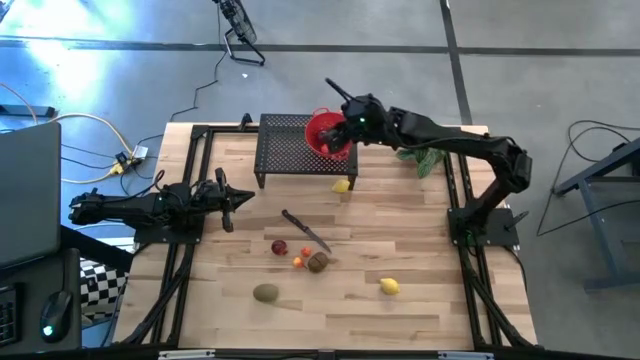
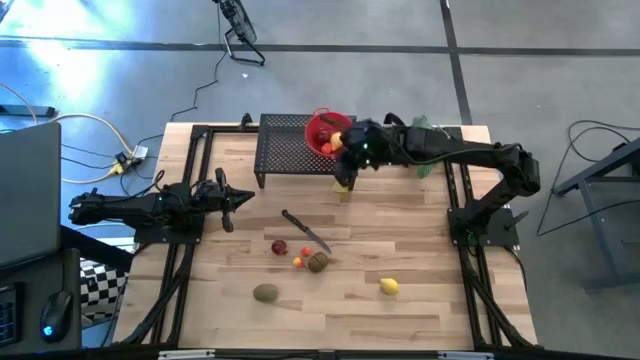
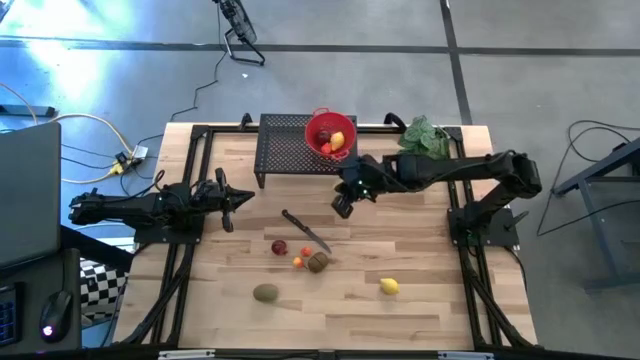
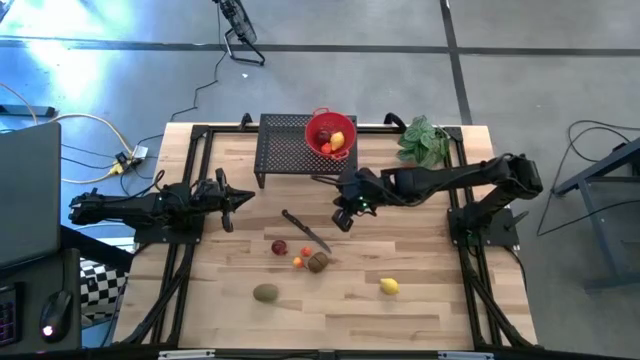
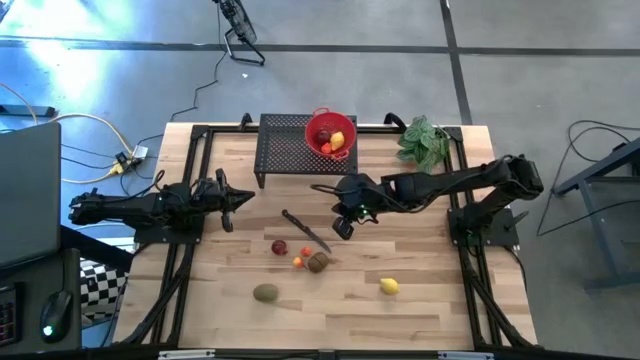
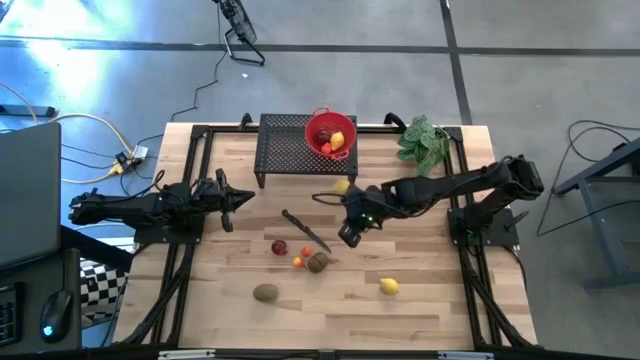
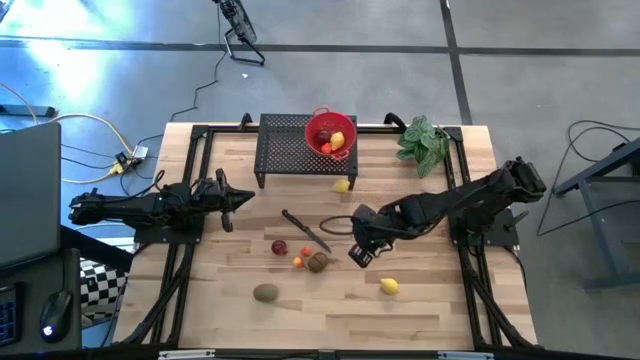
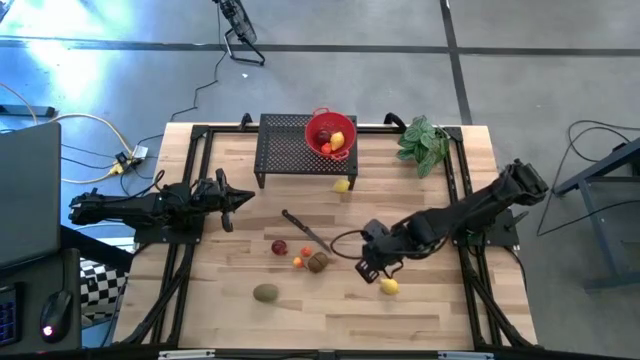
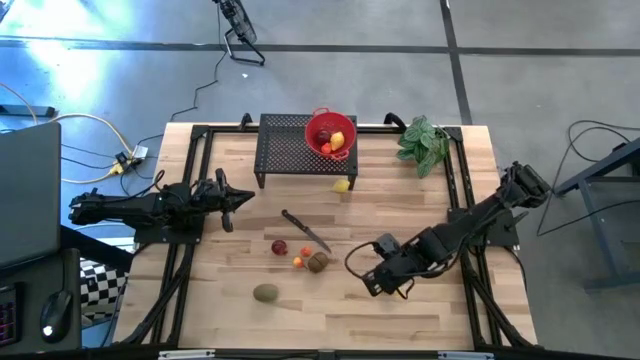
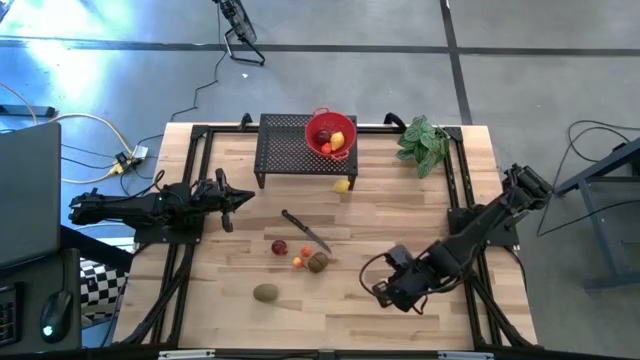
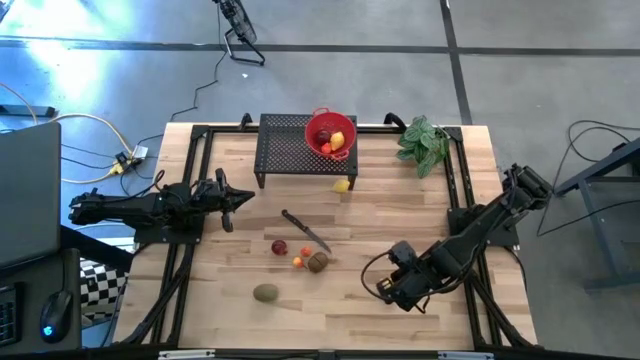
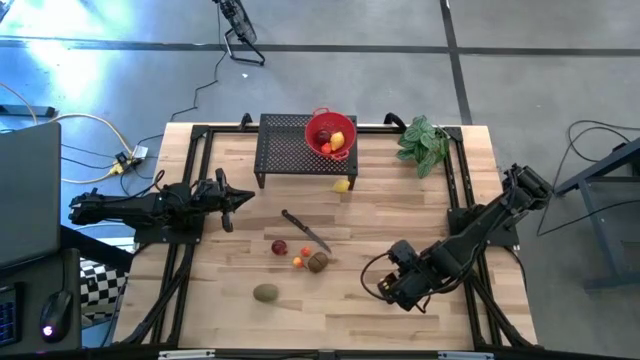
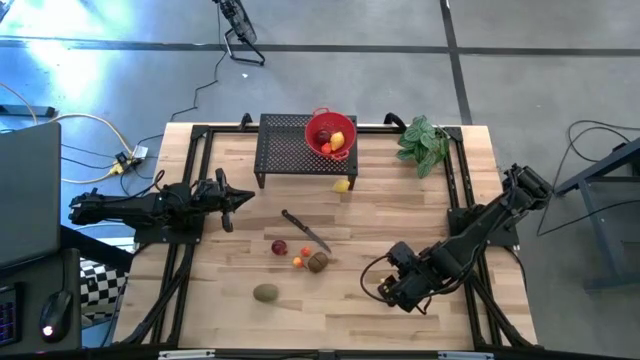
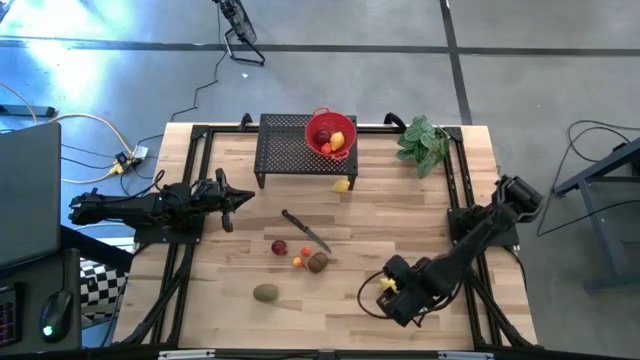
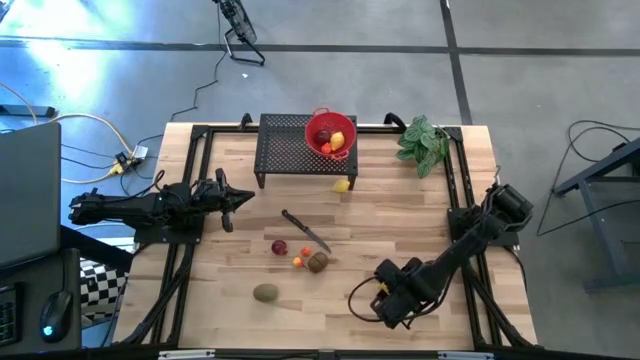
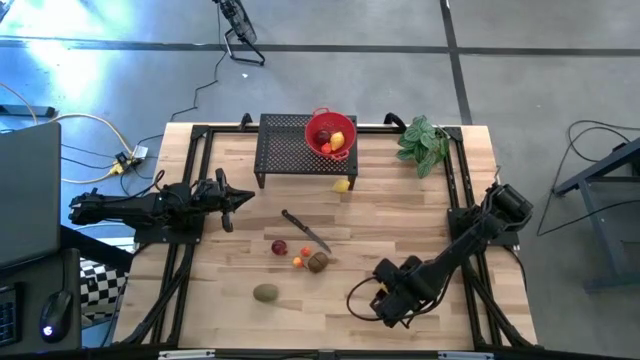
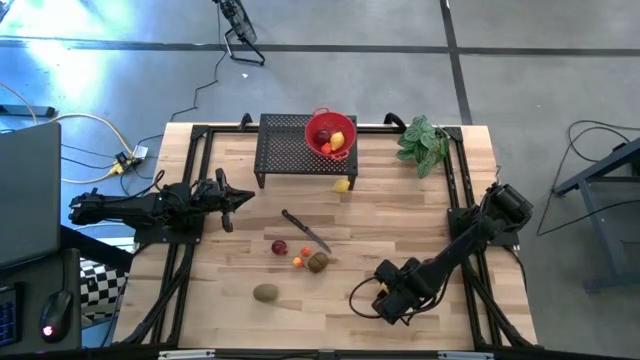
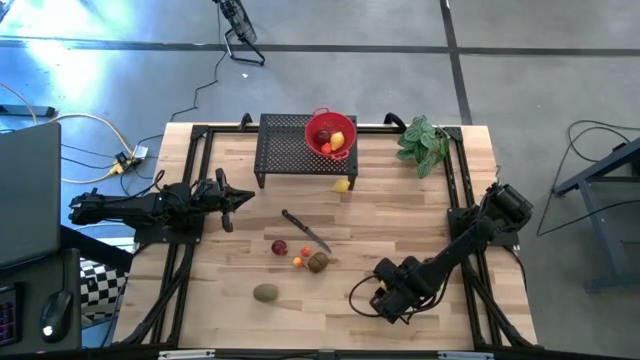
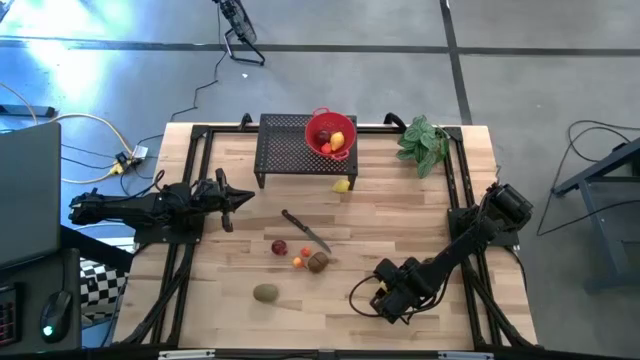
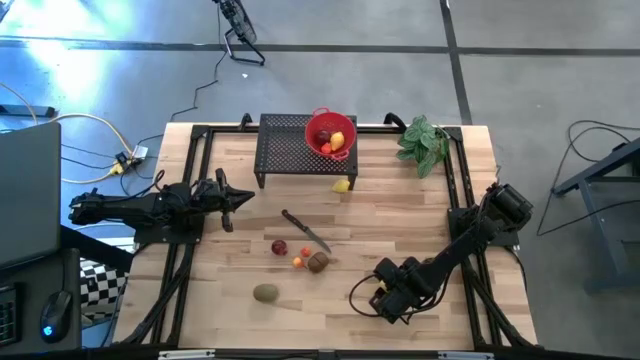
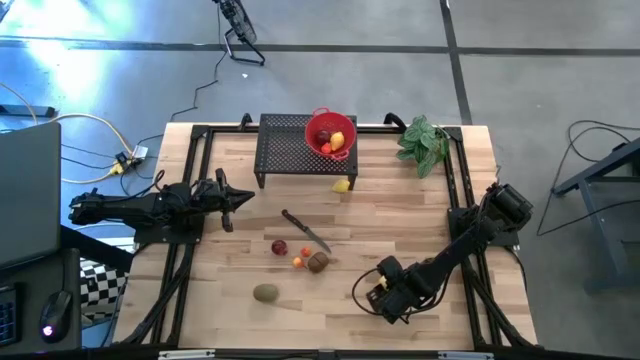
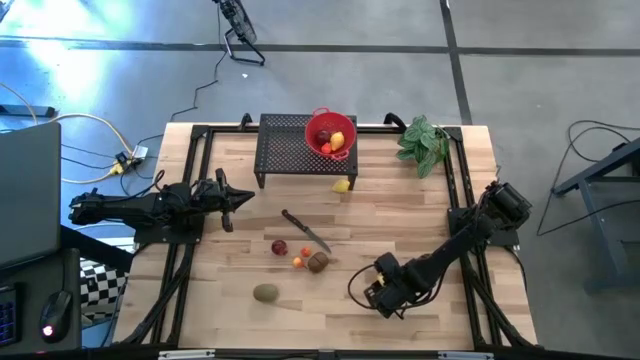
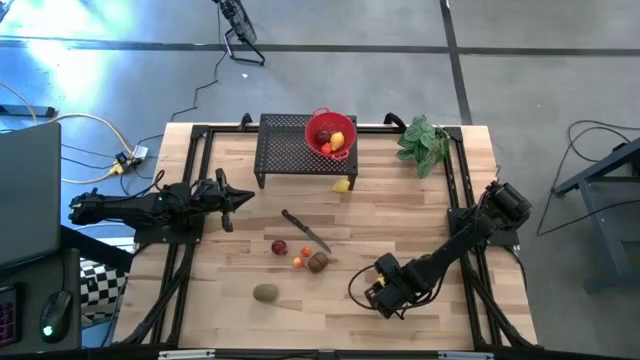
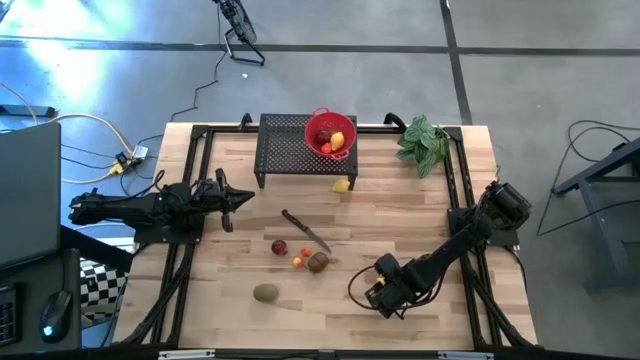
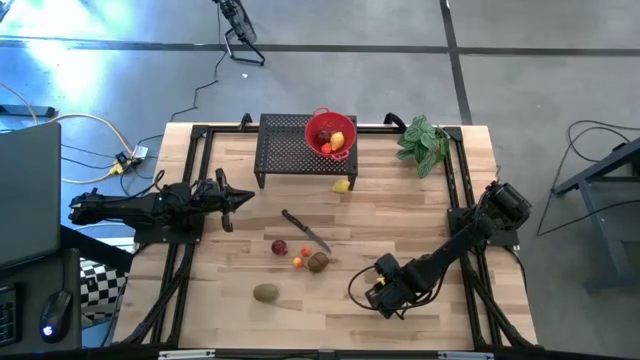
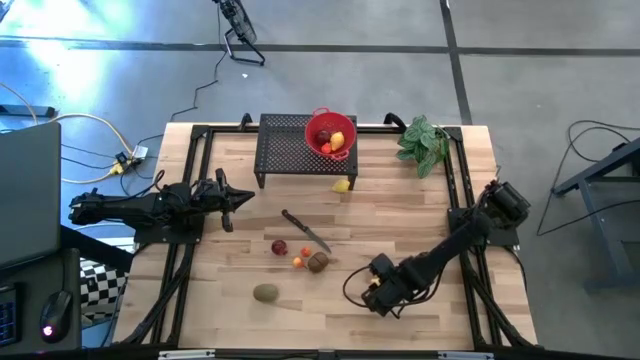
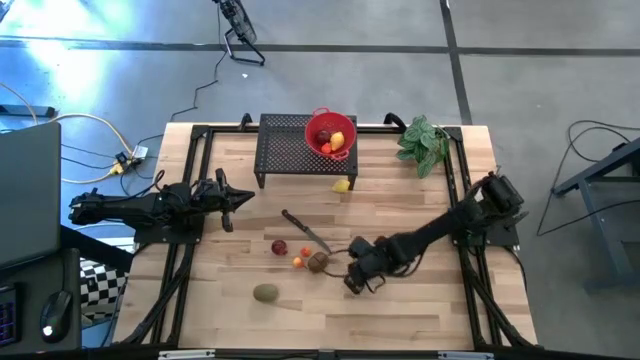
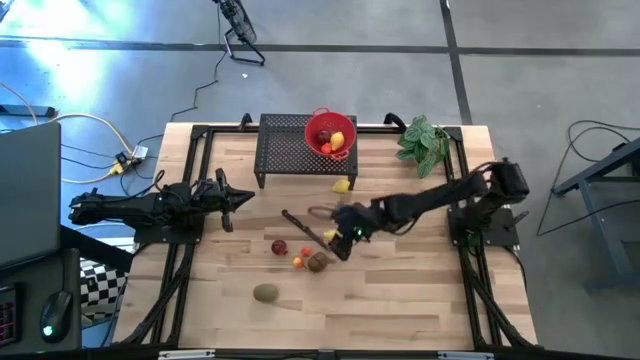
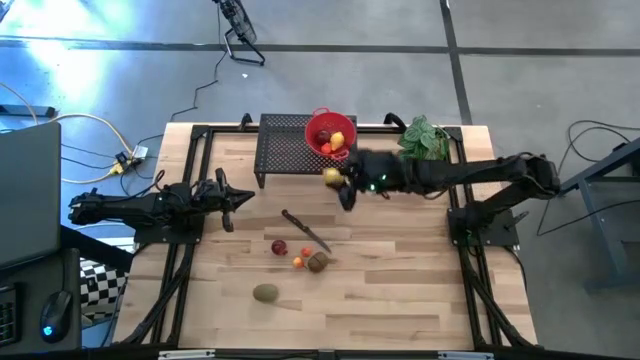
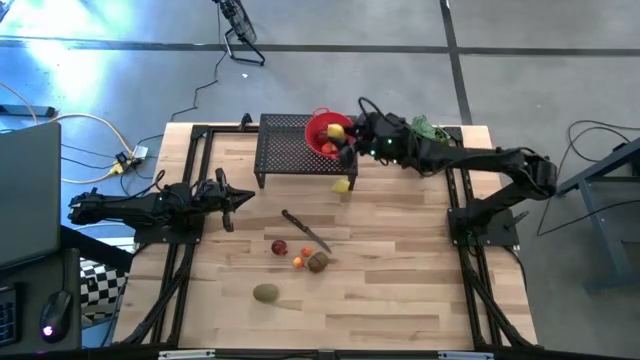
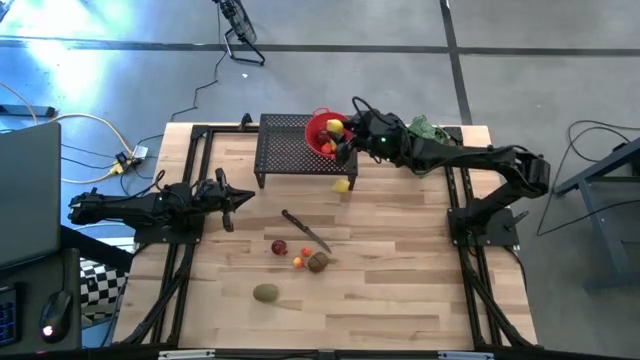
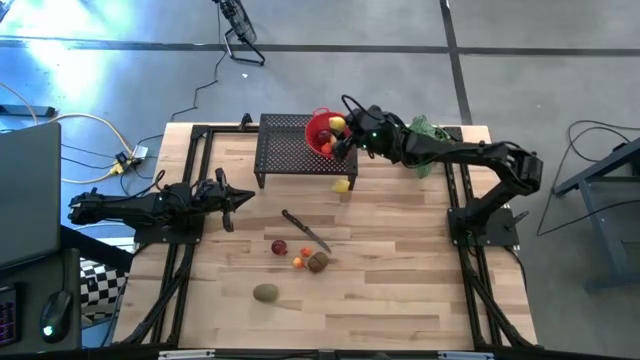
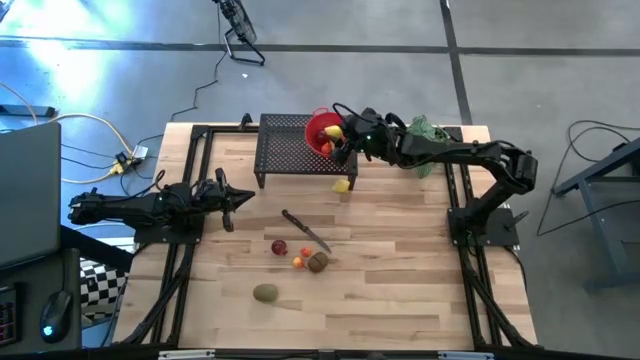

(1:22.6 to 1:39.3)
Task: Pick & Place Fruit
Put the bottom lemon into the colander on the shelf

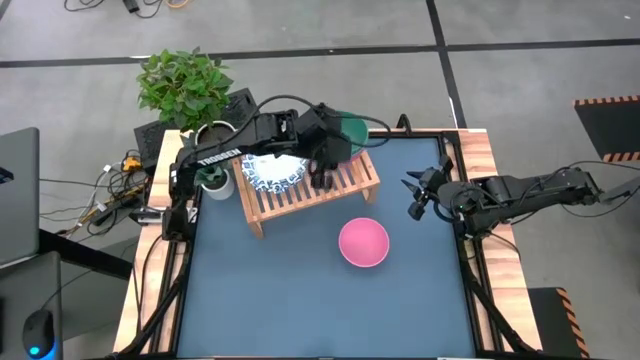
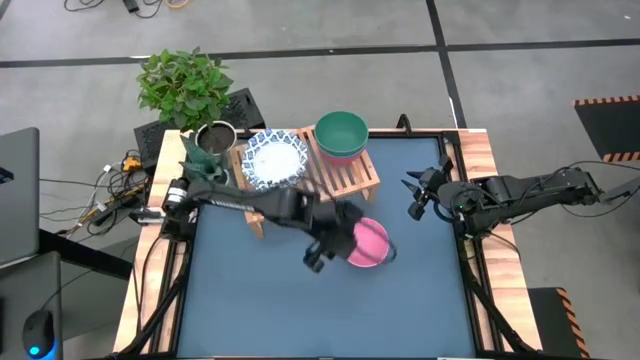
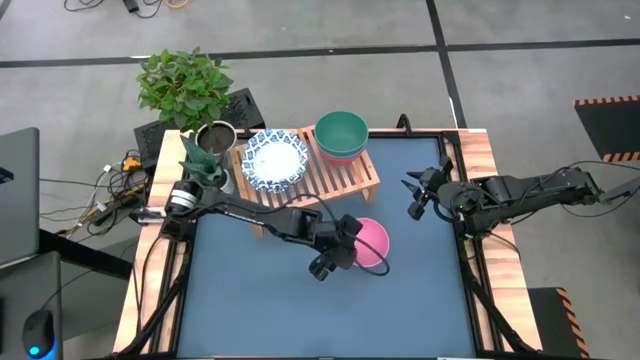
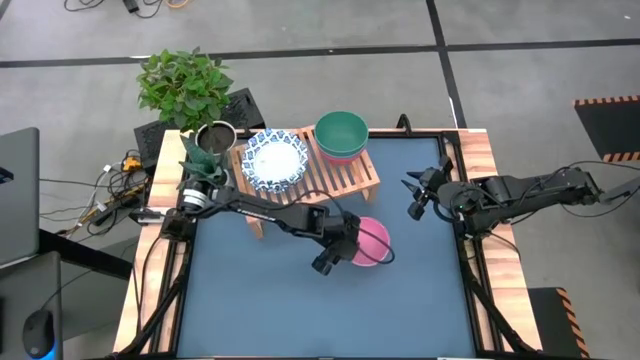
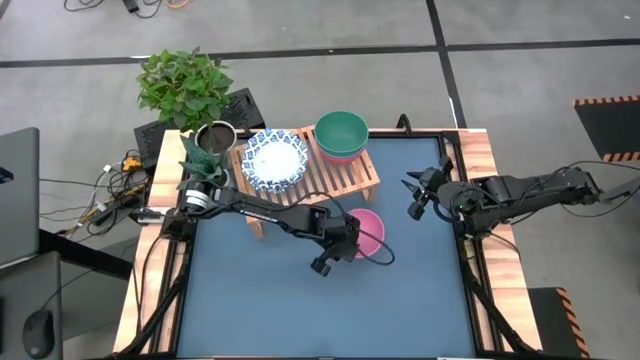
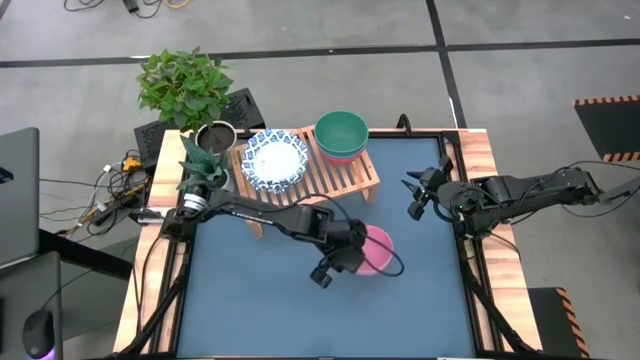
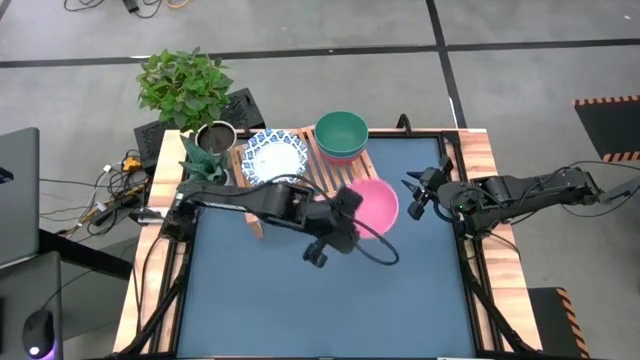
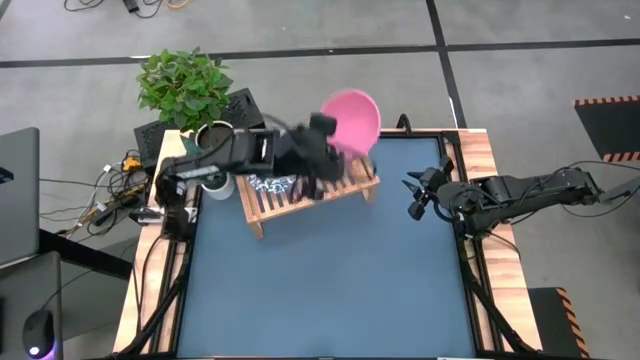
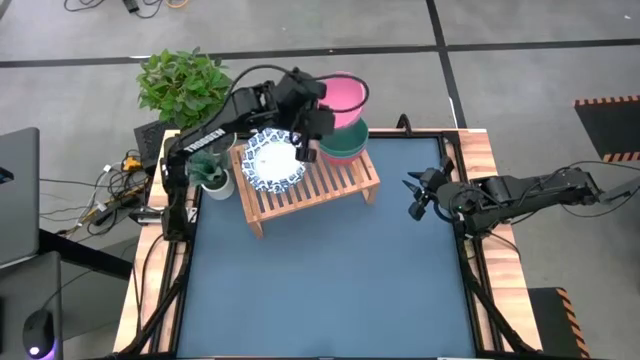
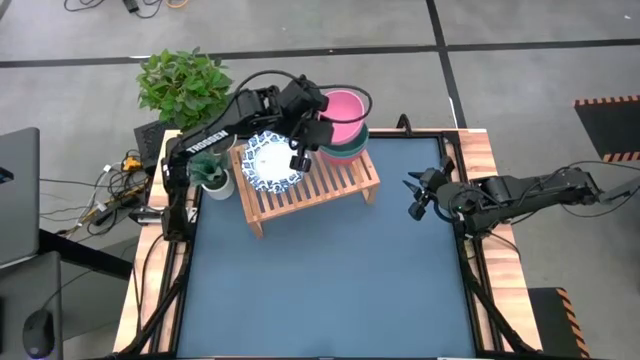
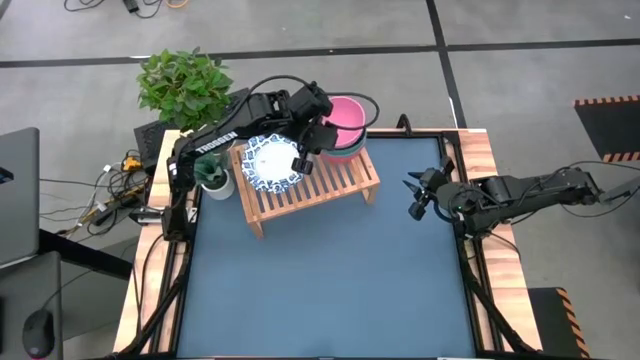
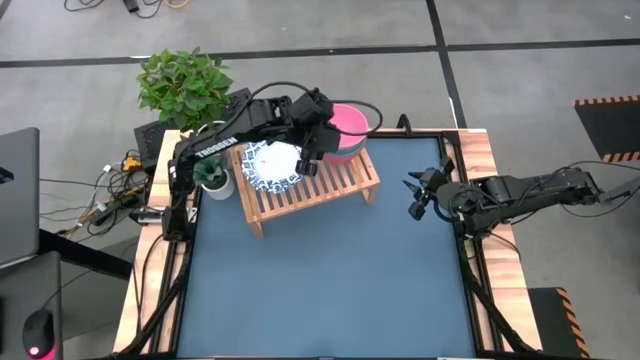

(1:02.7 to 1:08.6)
Task: Place and stack bowls onto a shelf
Stack the pink bowl on top of the green bowl
